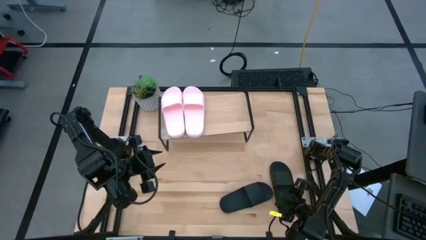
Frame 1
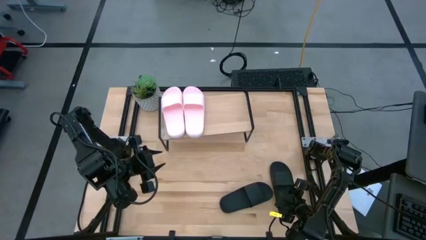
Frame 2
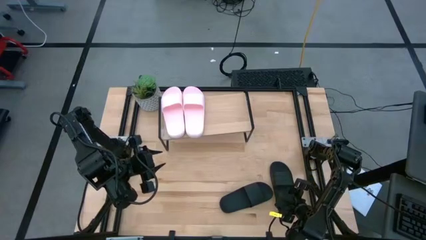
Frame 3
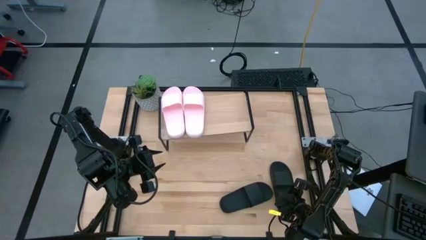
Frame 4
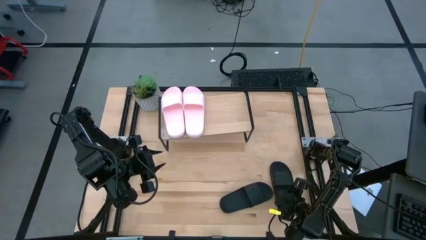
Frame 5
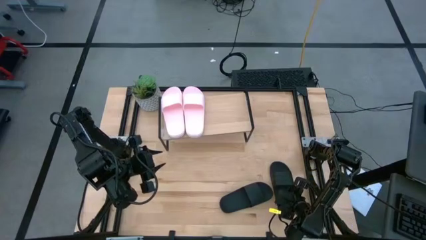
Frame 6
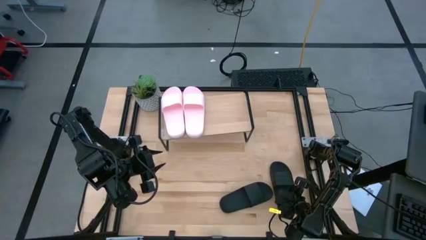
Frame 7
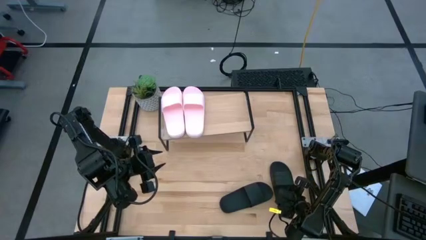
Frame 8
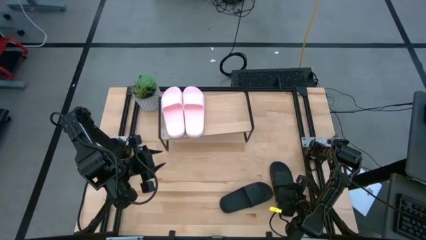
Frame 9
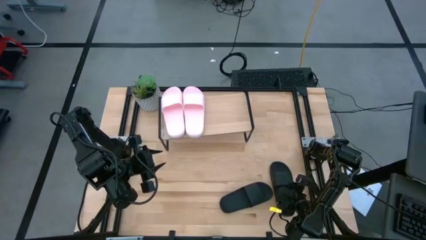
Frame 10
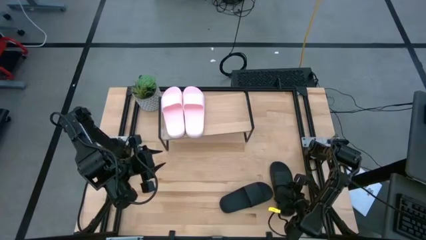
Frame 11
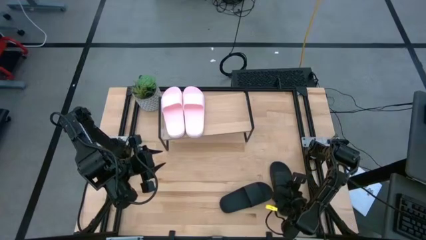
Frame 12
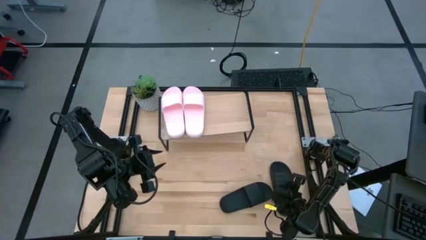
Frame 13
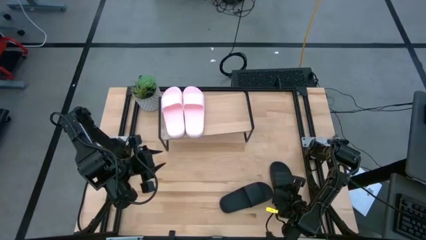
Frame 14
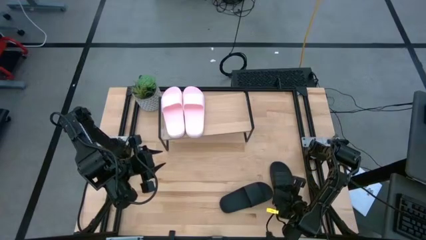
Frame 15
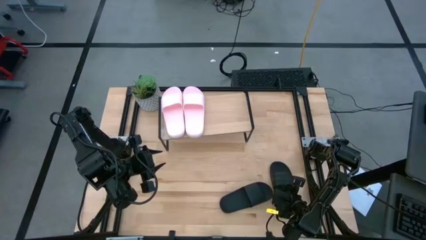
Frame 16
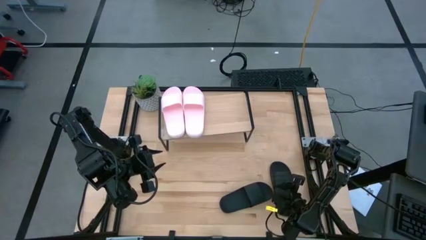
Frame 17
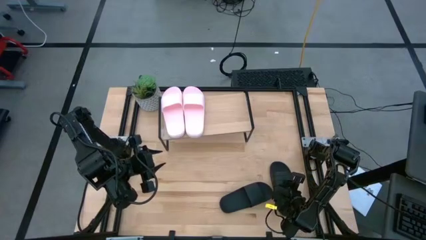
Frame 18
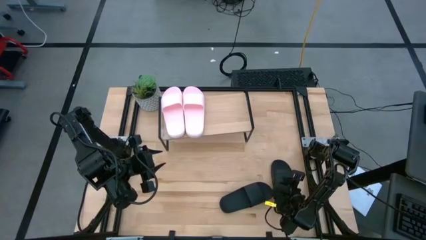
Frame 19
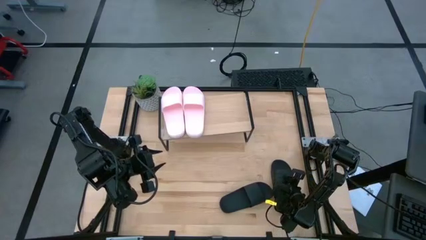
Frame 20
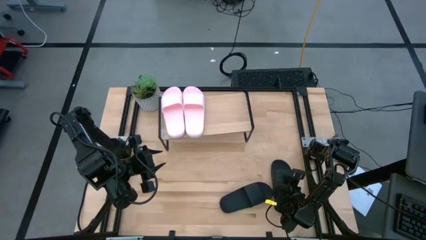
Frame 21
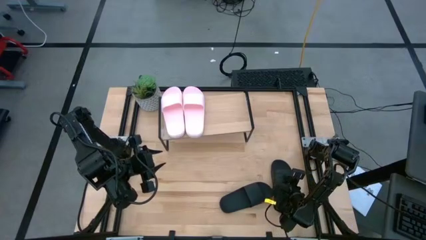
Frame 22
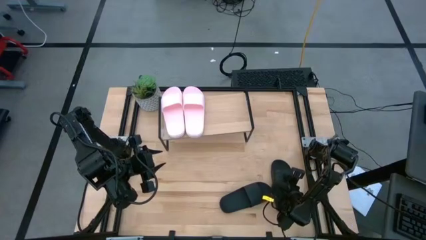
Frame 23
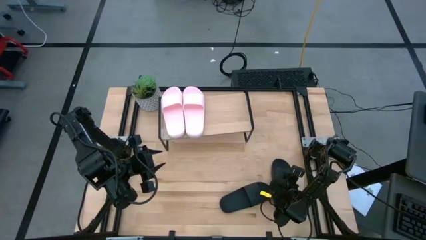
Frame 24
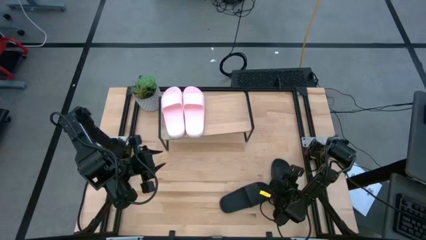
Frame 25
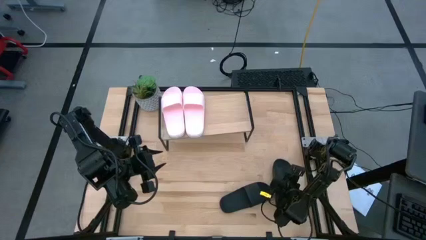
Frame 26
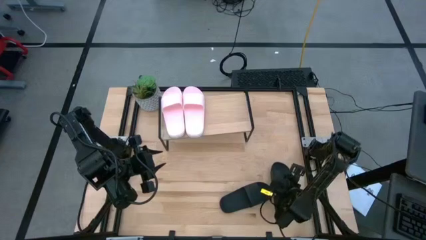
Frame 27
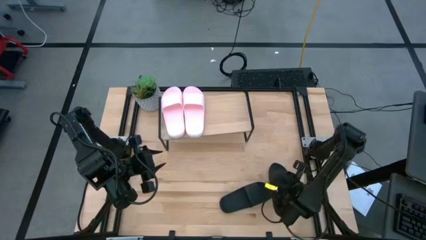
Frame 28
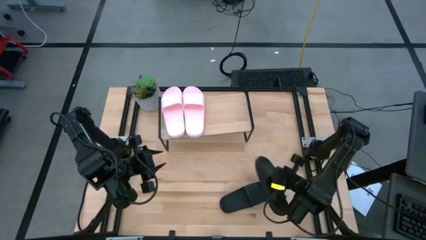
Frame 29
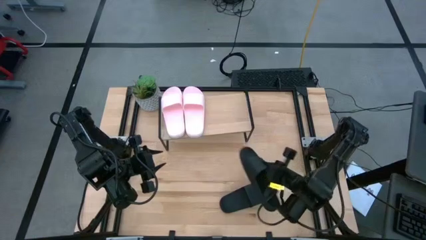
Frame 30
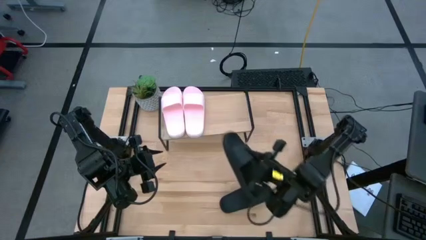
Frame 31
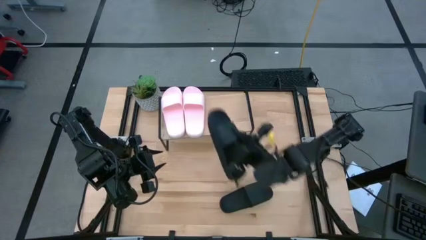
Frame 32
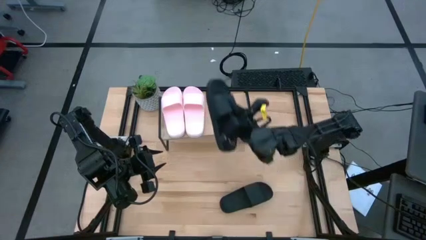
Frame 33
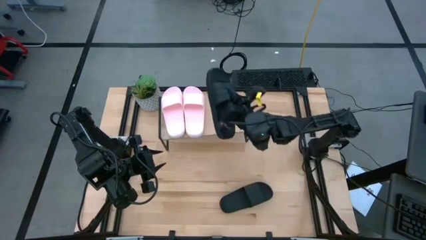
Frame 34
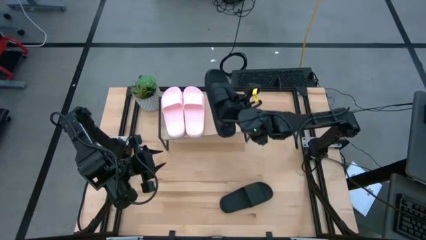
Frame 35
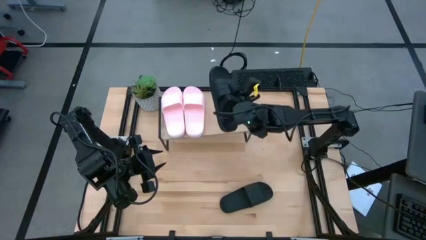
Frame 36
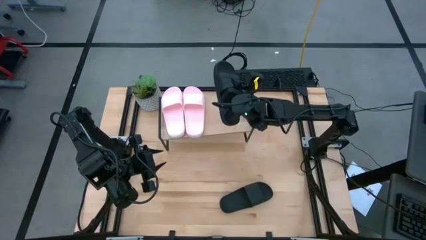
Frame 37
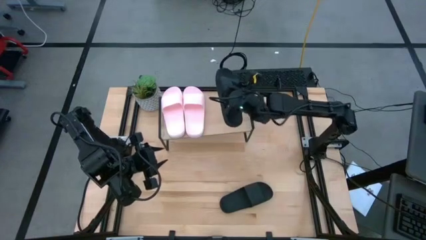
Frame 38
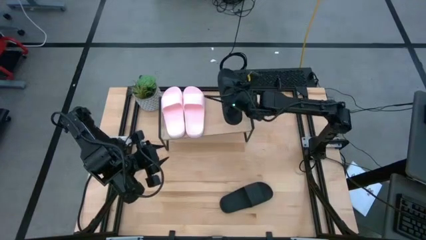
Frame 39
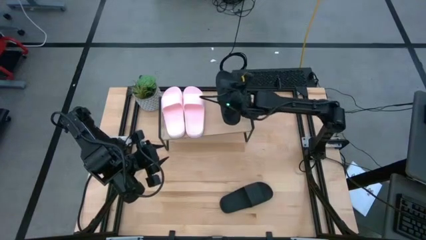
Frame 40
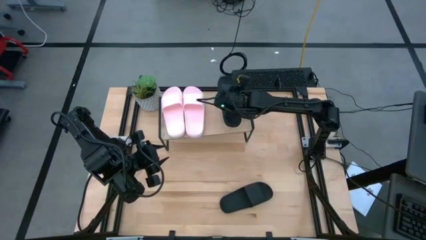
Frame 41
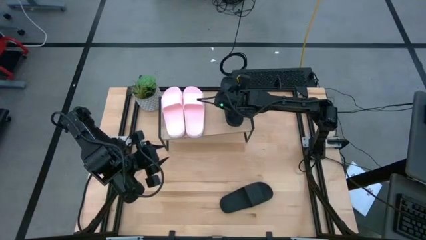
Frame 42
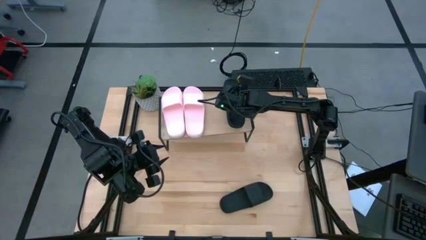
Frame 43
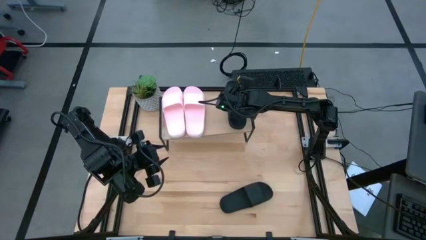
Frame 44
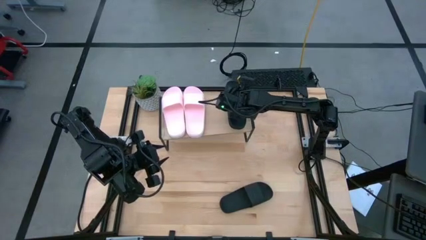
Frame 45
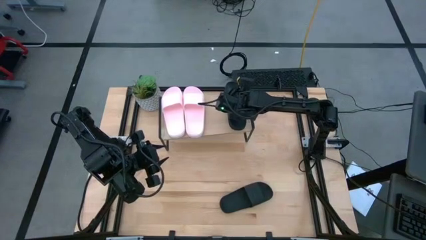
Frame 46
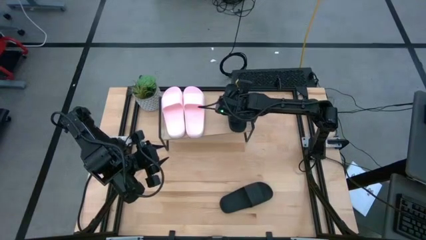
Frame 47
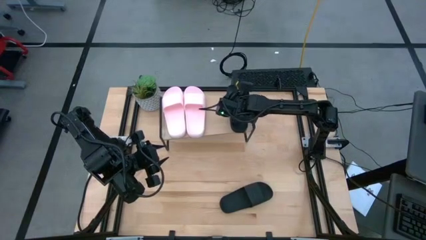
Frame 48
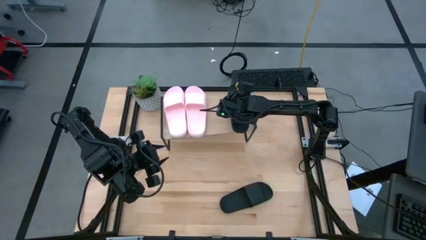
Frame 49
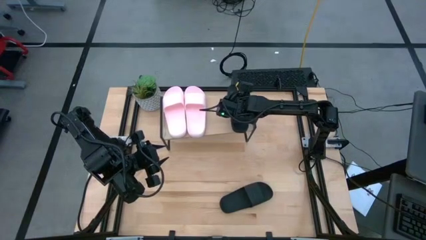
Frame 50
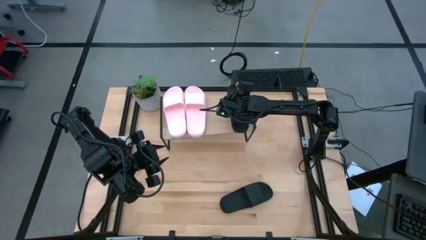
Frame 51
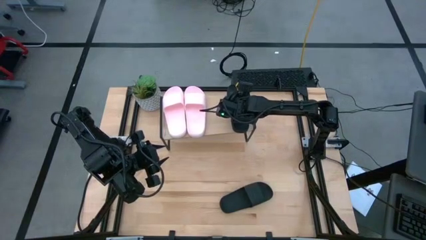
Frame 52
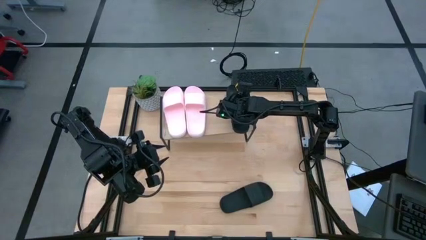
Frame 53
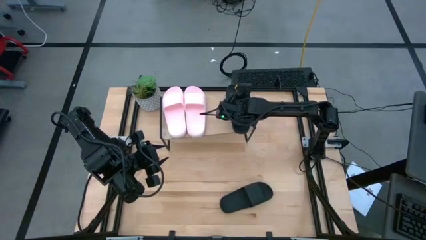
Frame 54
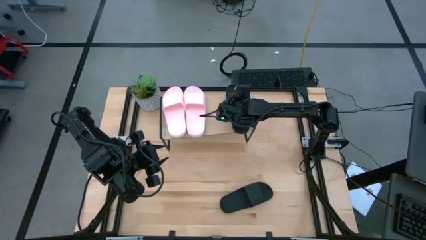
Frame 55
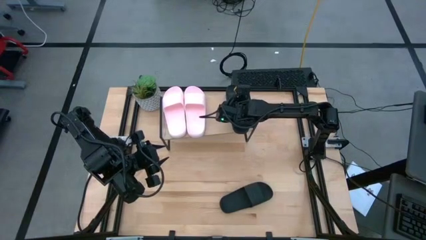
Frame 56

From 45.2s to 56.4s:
Task: Pick and place slides into the shelf
Put the right black slipper on the shelf
